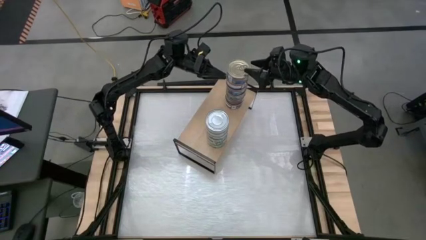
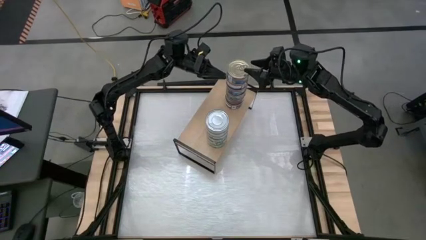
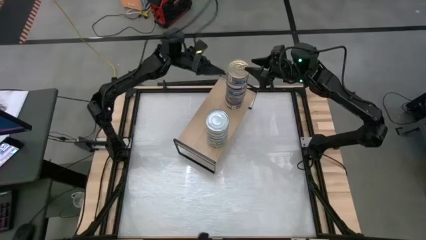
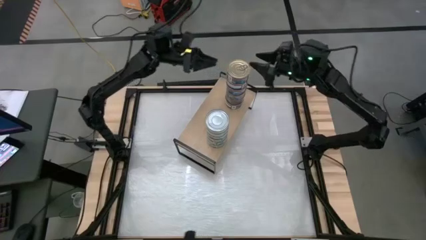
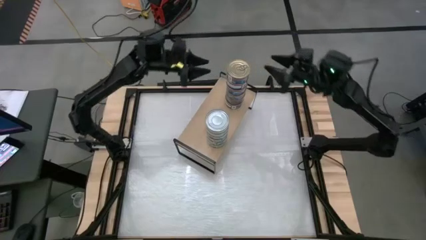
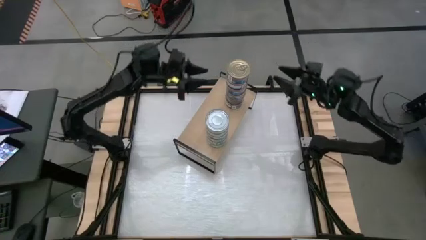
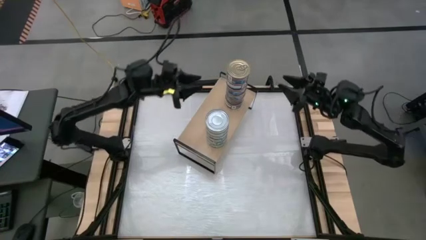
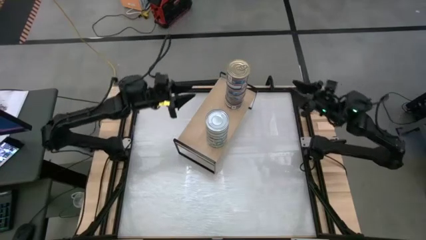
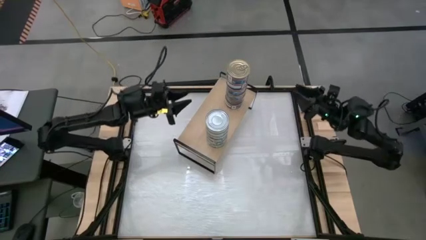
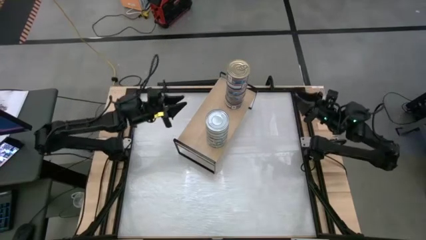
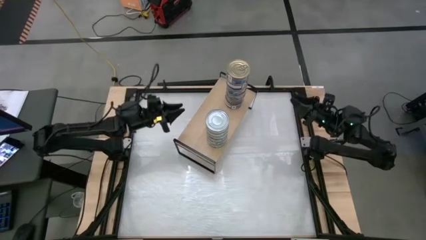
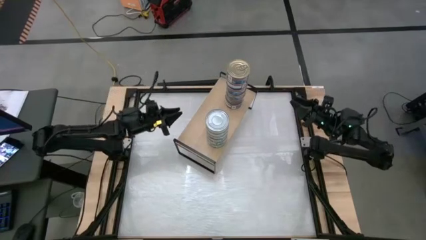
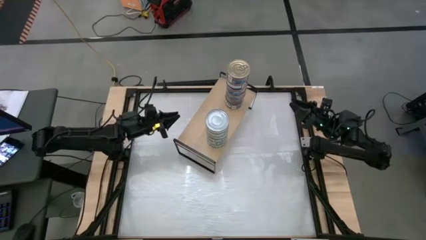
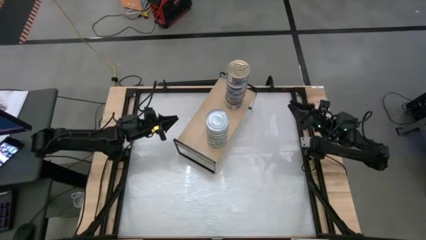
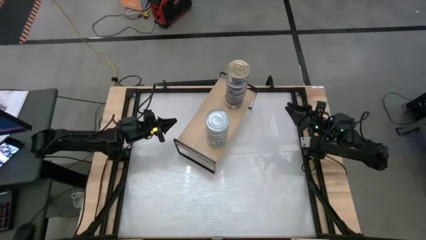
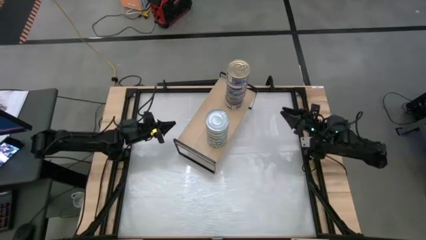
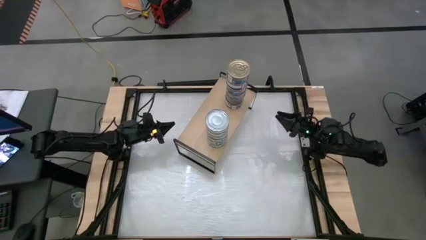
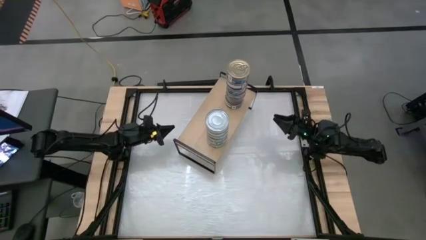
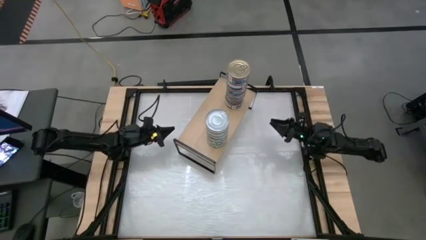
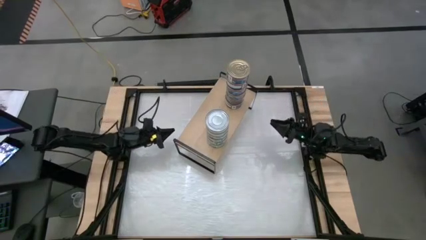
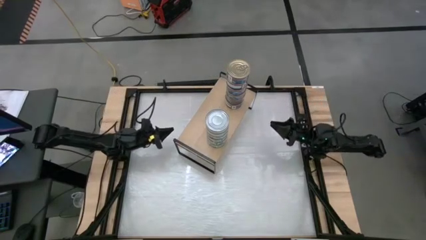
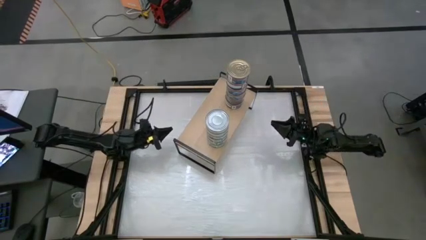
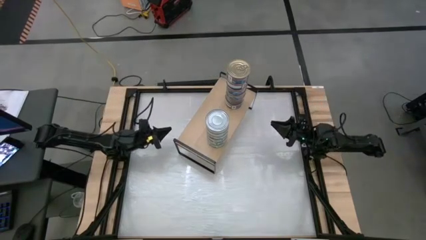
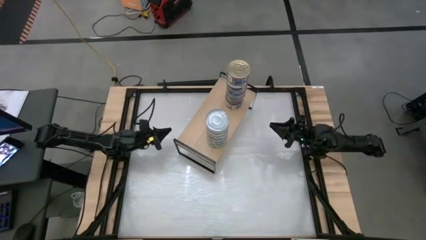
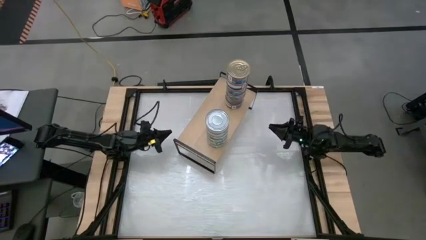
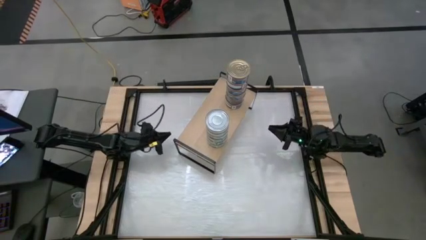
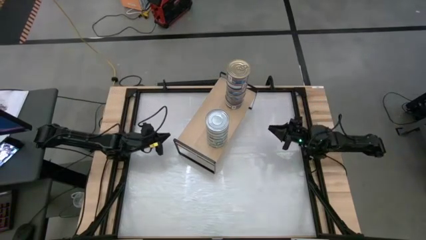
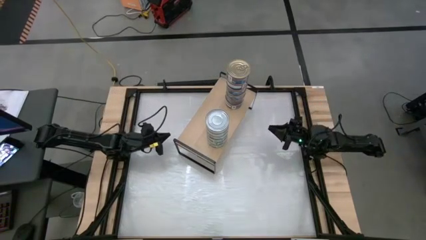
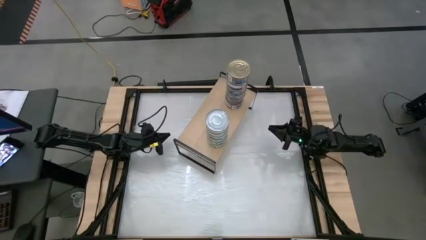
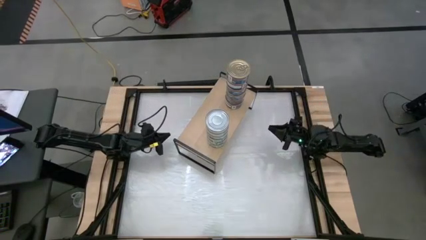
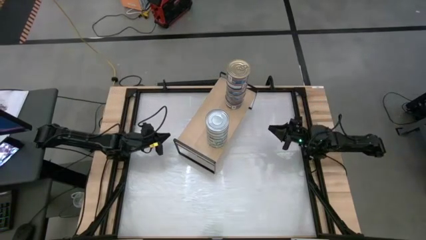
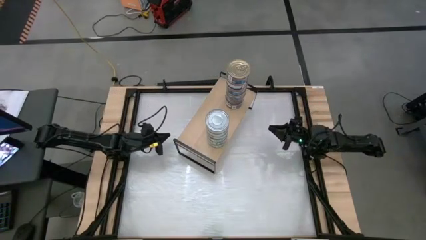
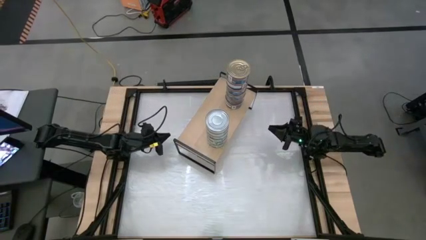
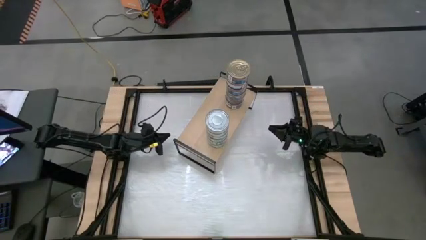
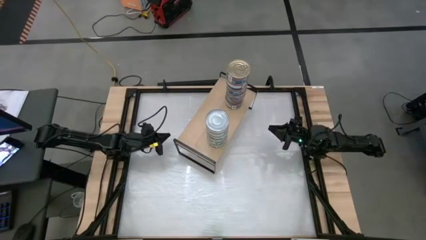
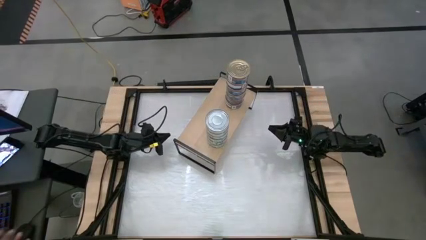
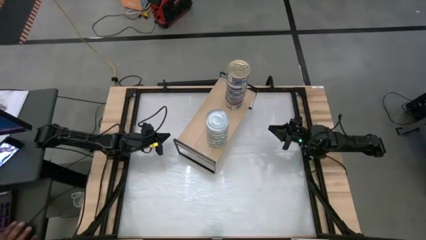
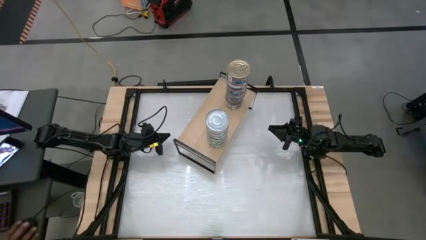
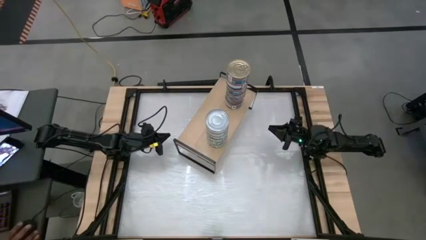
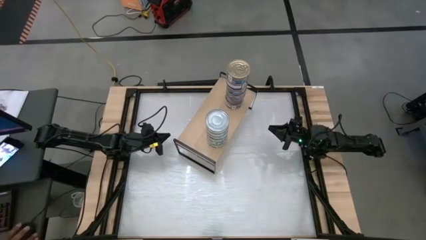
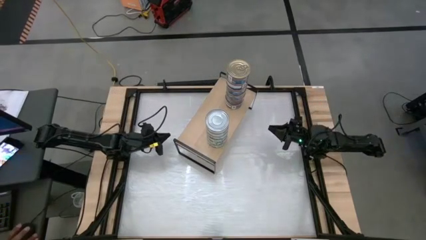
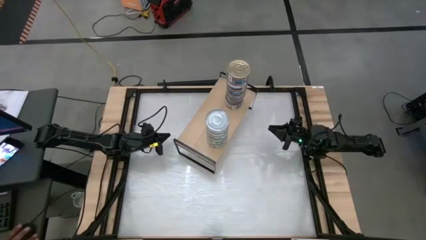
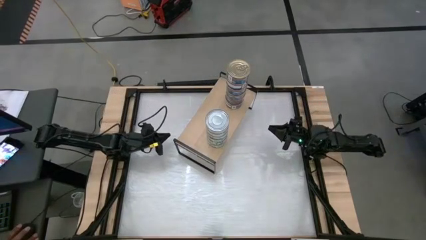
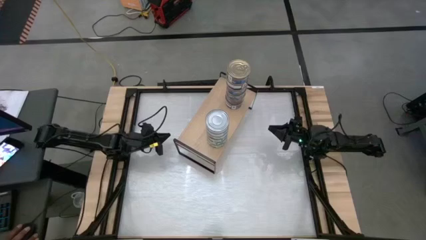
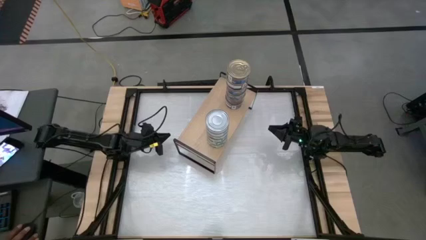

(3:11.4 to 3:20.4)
Task: Stack canned seafood by type on shelf
Return to Home Position

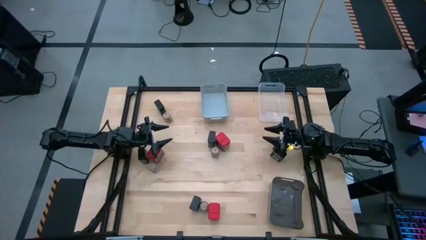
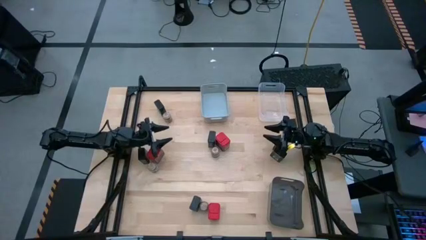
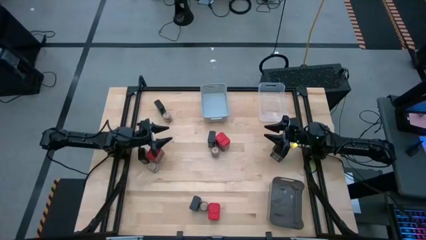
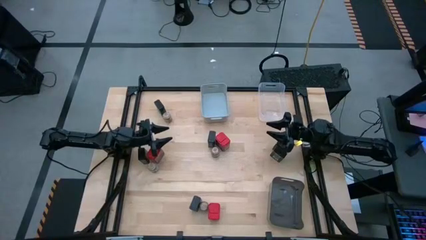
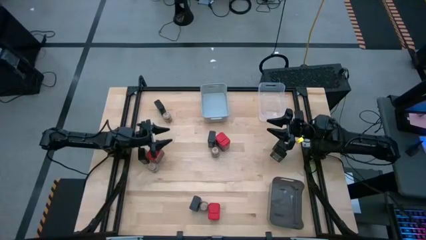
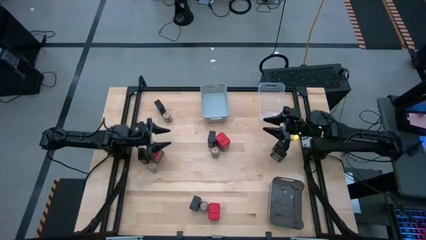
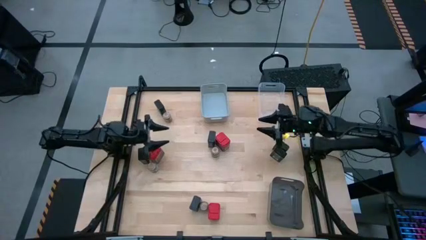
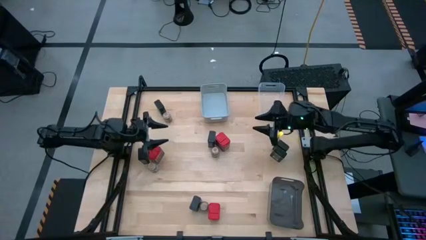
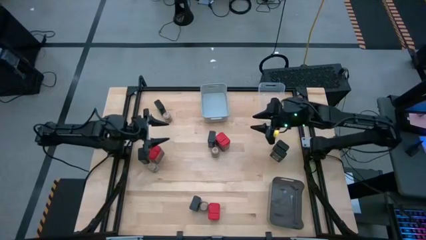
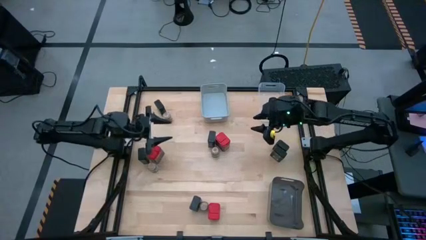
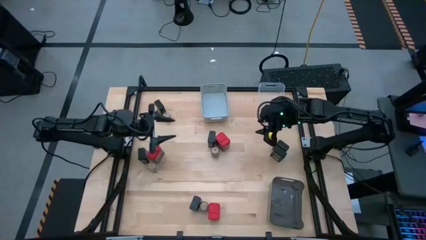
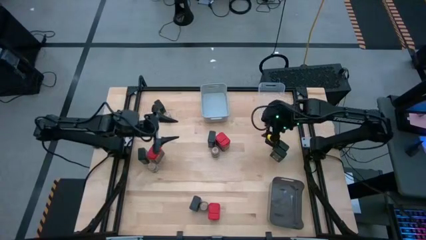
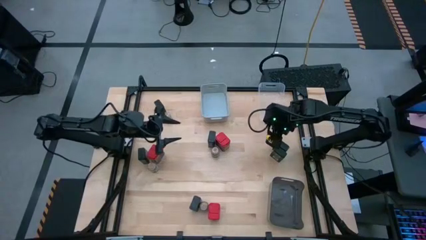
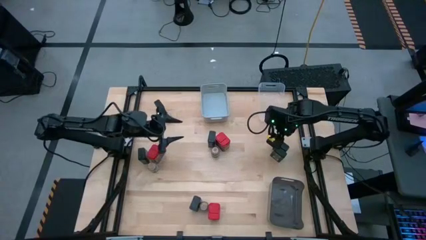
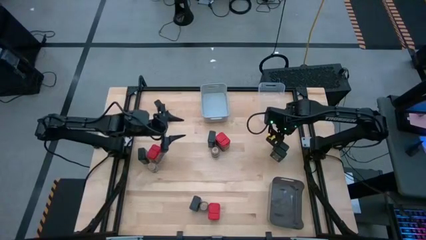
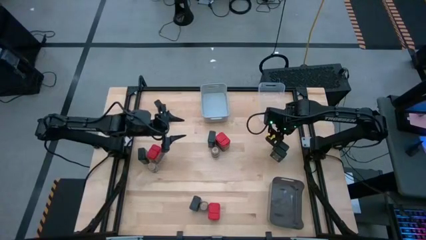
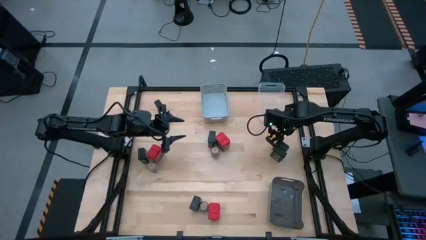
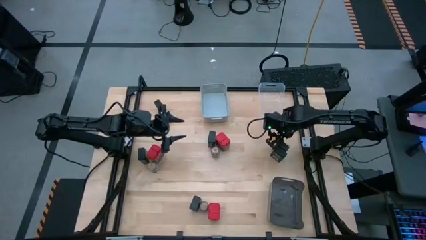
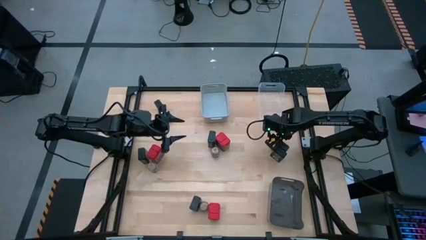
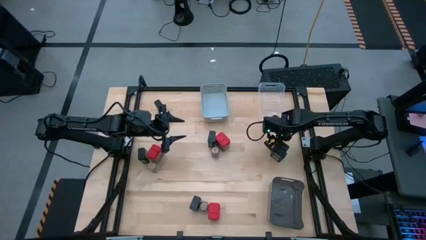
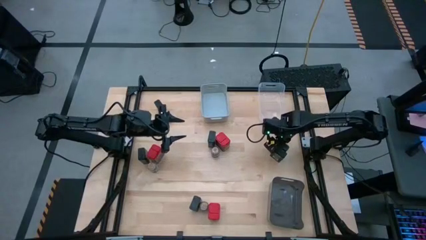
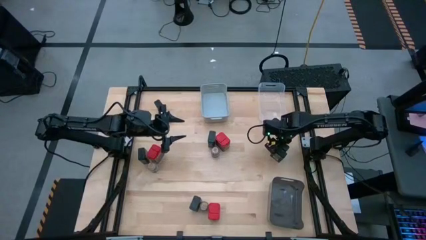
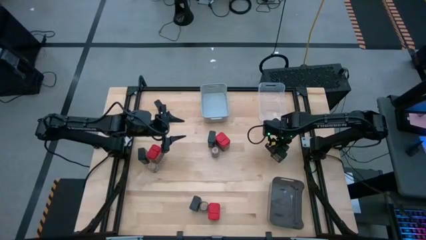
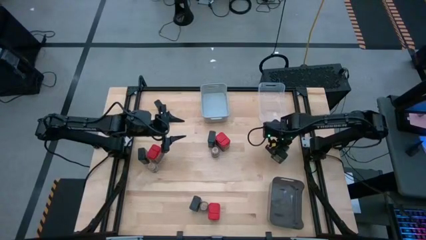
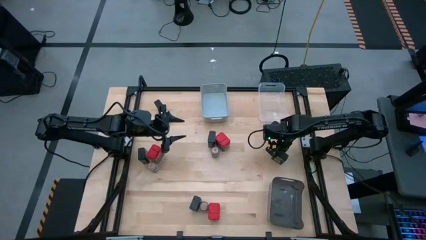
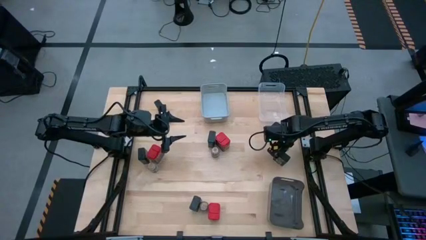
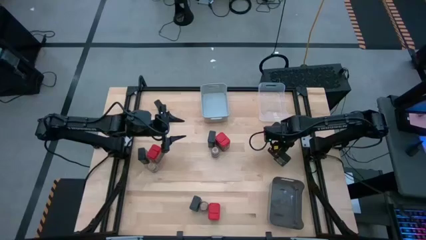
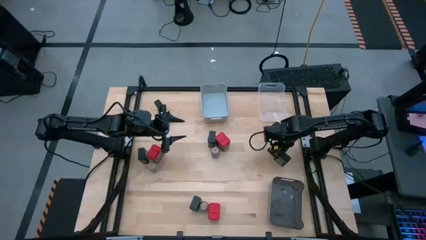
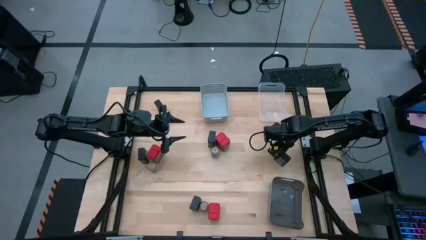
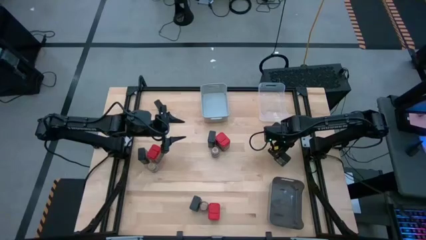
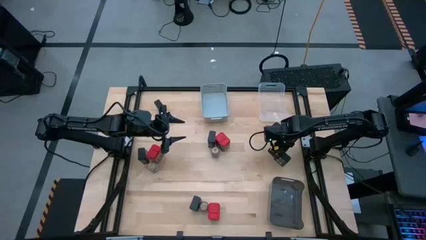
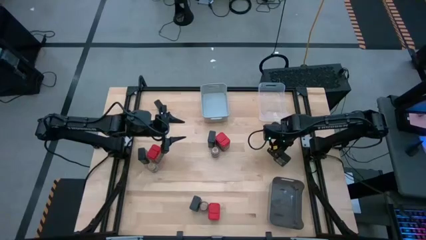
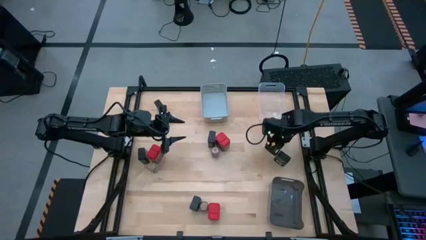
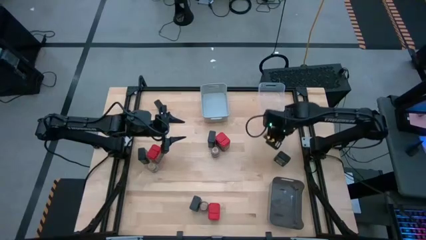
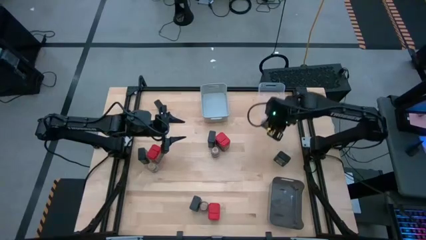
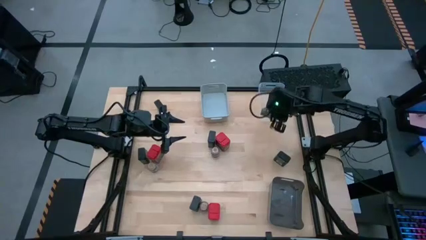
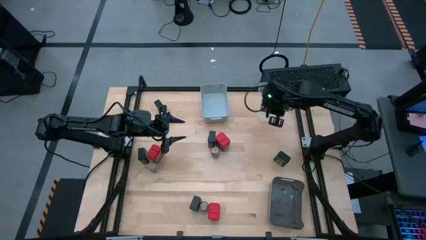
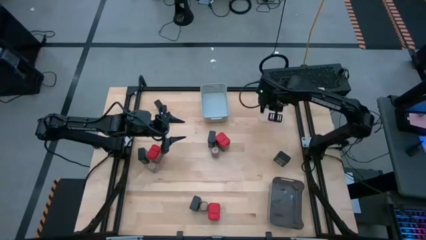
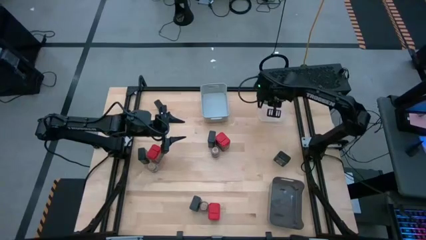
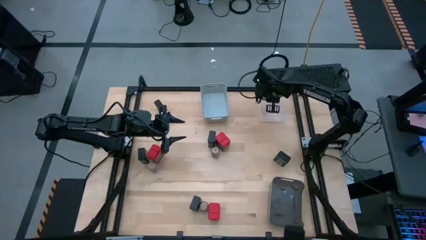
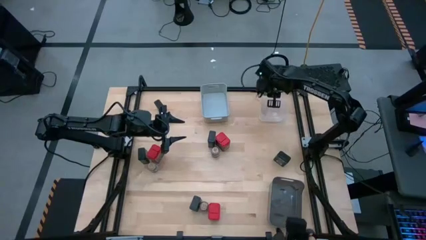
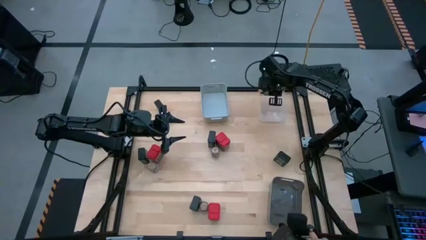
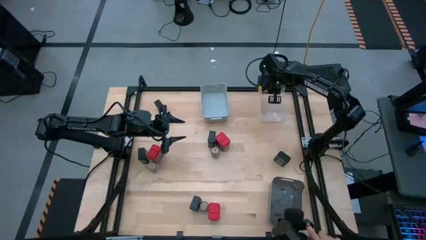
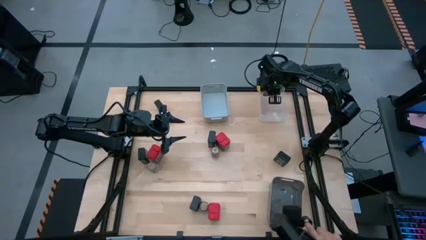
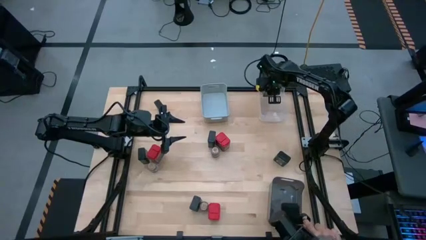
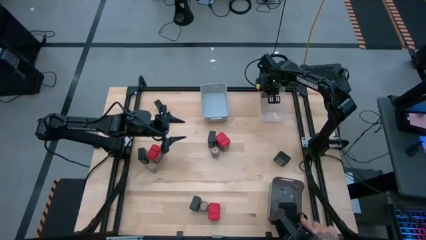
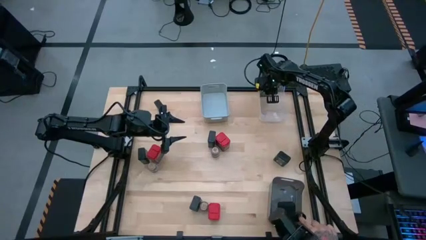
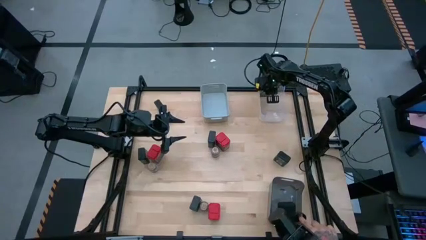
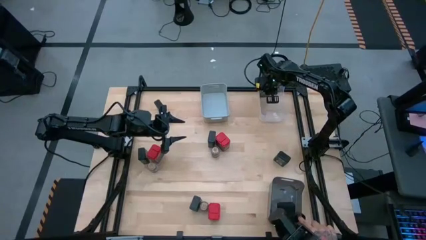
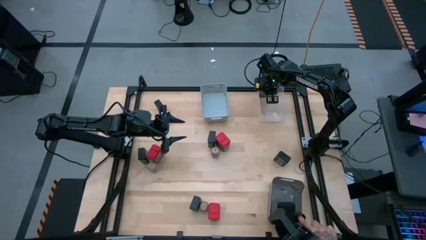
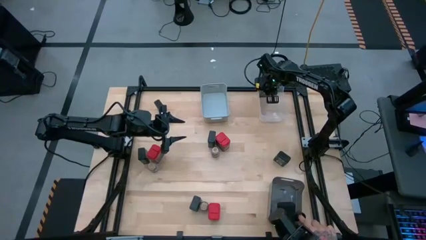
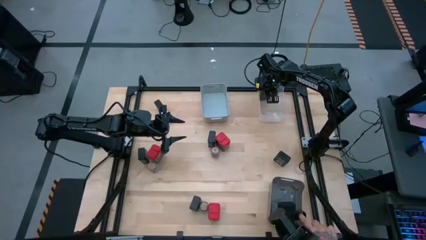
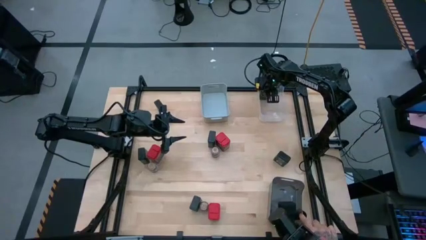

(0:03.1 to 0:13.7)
Task: Sort spices by type
Put the black seasoning can into the transparent bin
